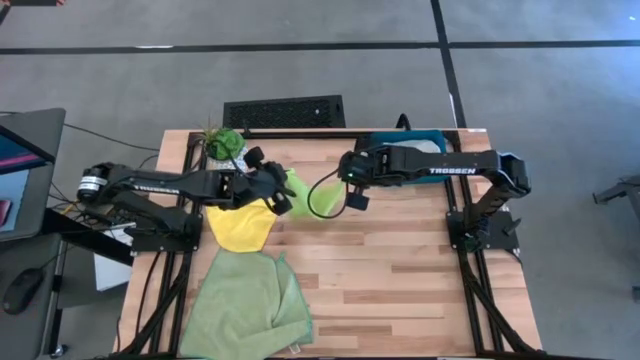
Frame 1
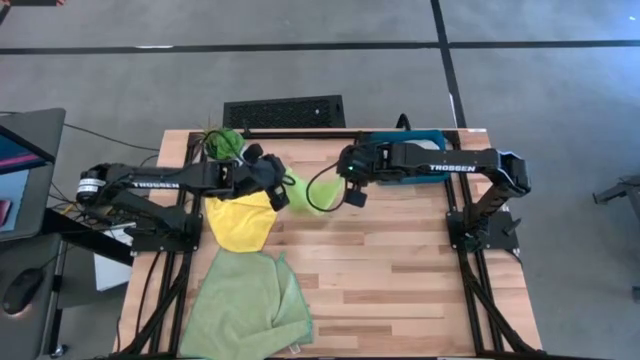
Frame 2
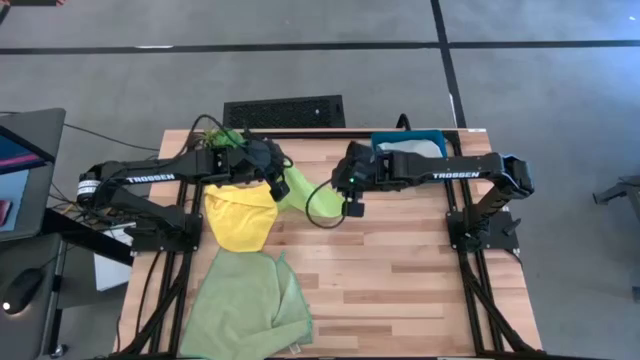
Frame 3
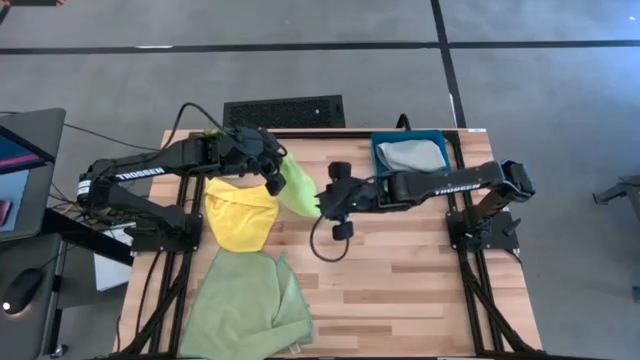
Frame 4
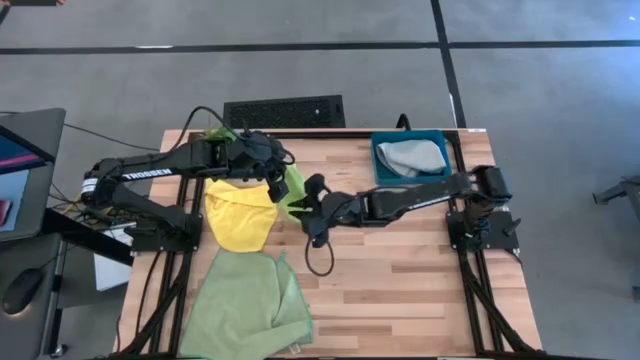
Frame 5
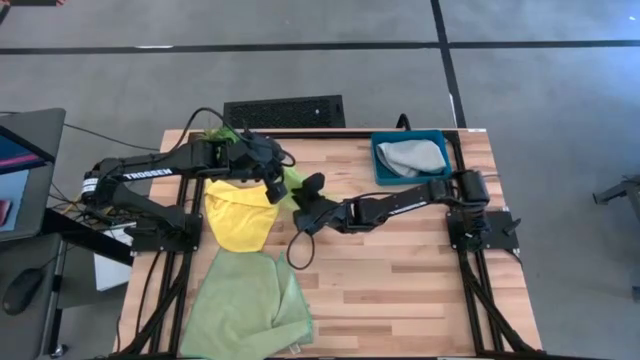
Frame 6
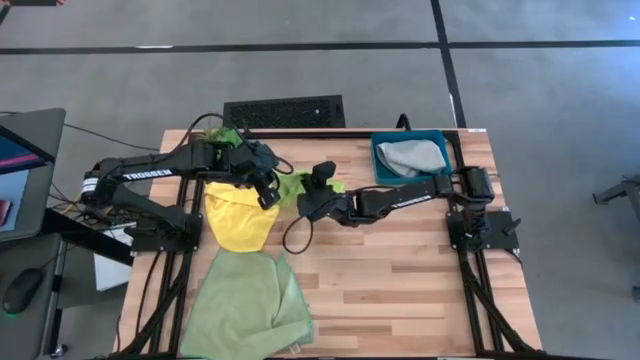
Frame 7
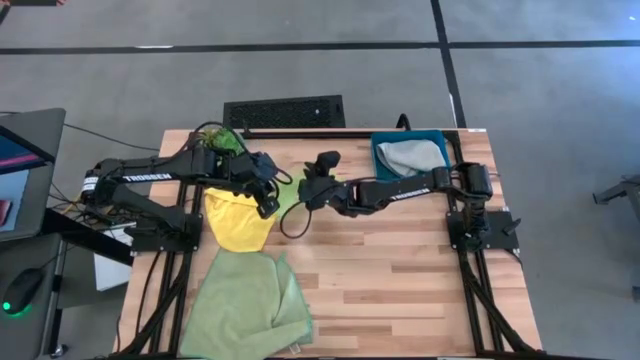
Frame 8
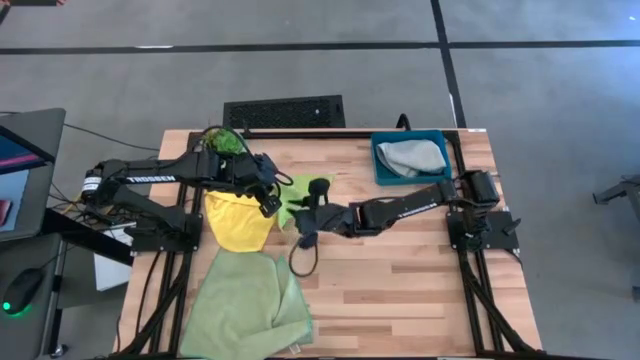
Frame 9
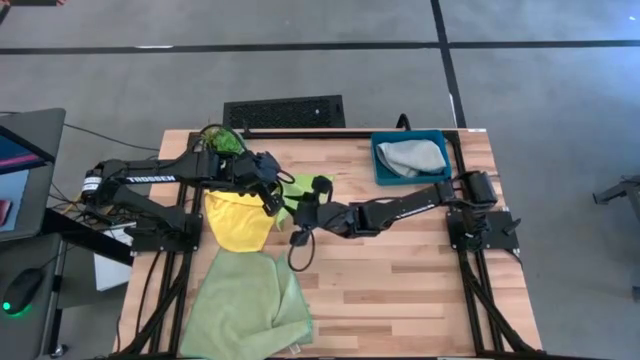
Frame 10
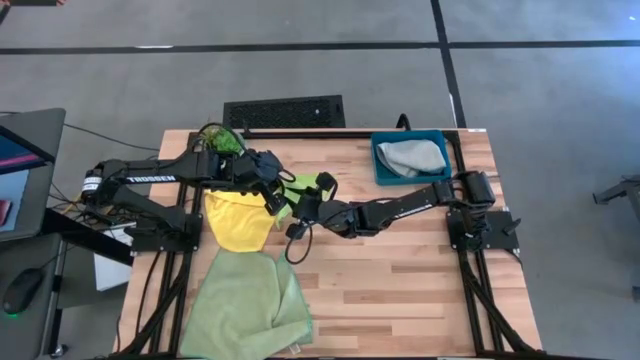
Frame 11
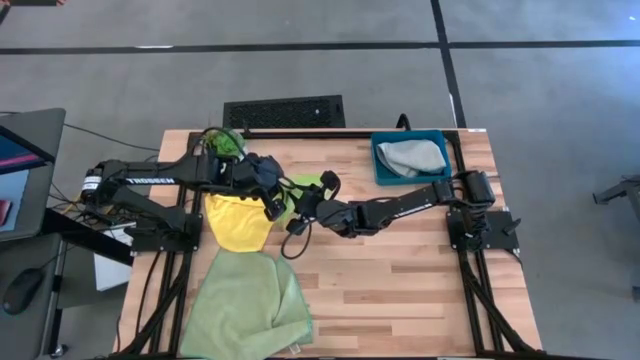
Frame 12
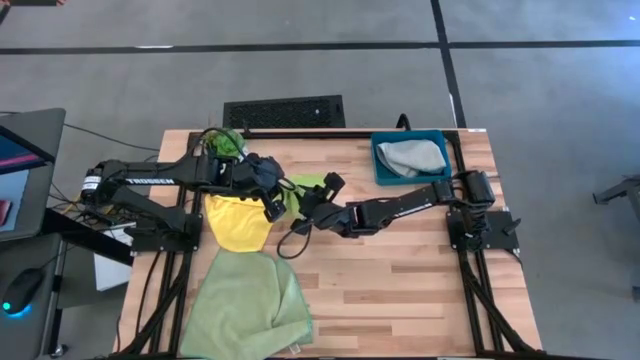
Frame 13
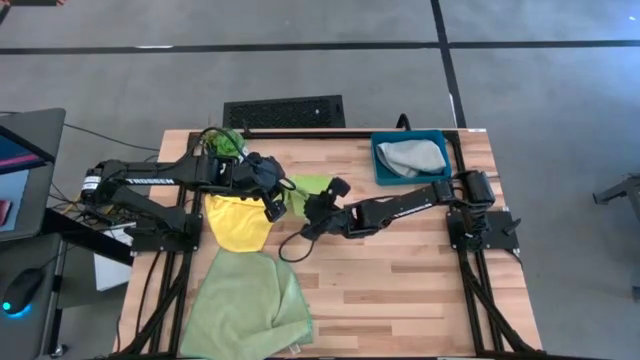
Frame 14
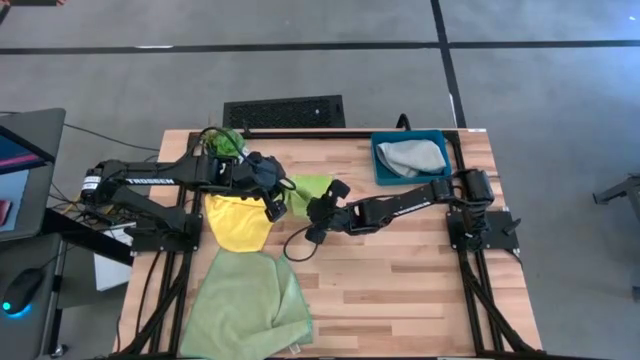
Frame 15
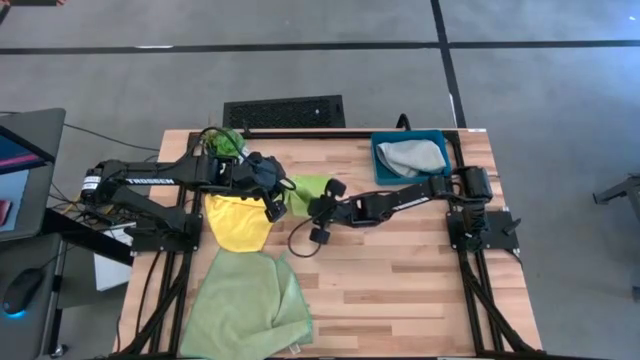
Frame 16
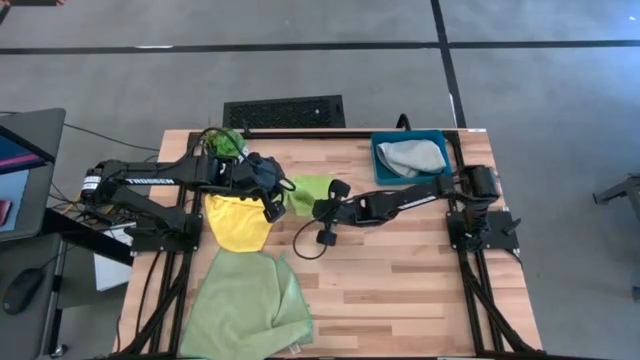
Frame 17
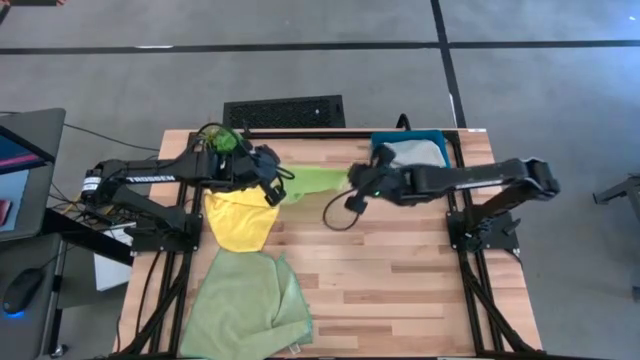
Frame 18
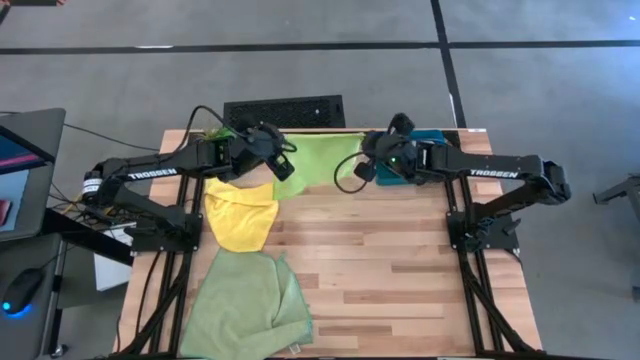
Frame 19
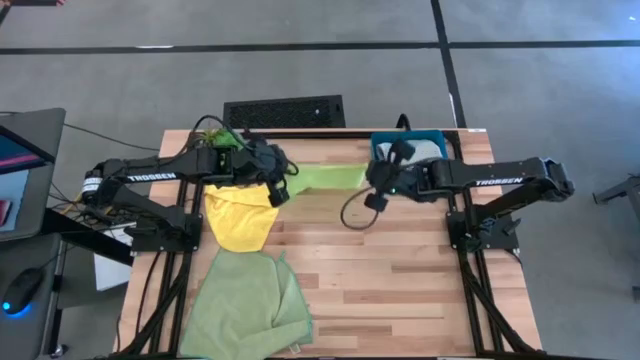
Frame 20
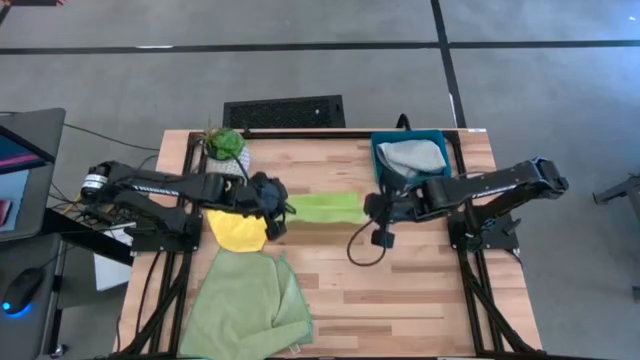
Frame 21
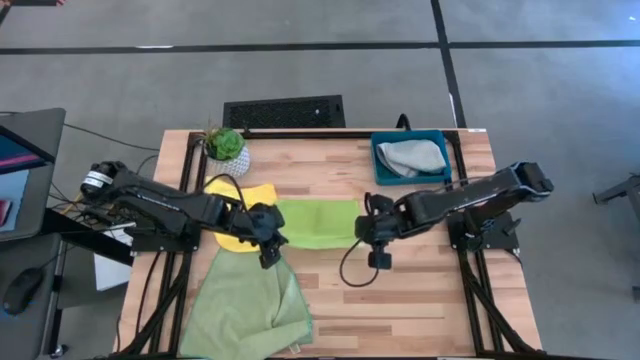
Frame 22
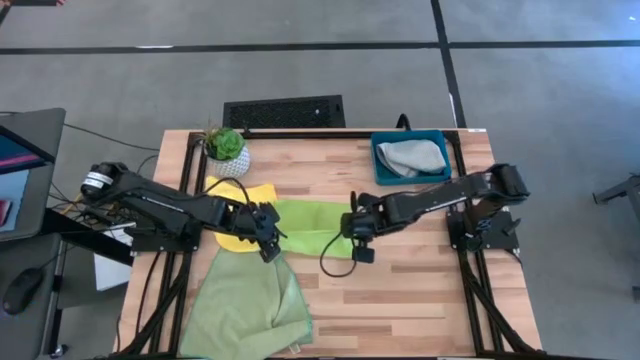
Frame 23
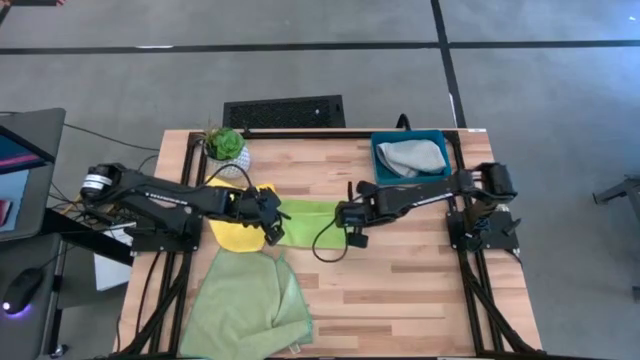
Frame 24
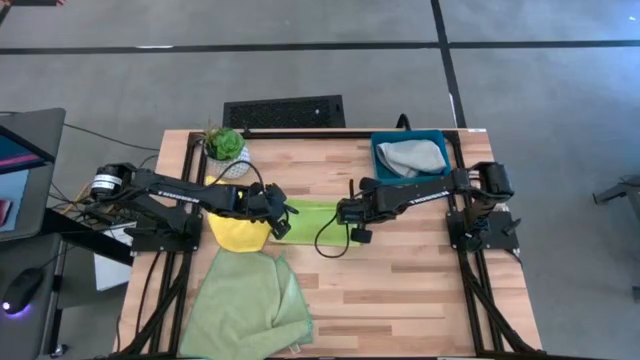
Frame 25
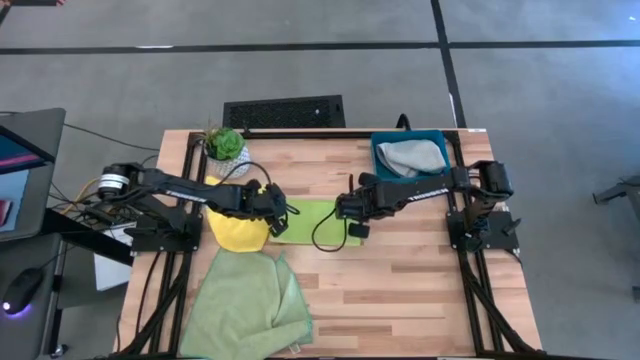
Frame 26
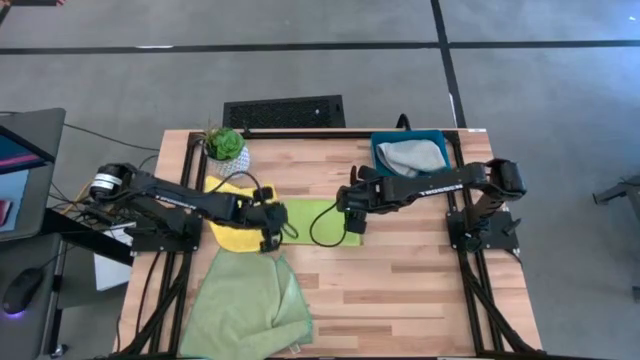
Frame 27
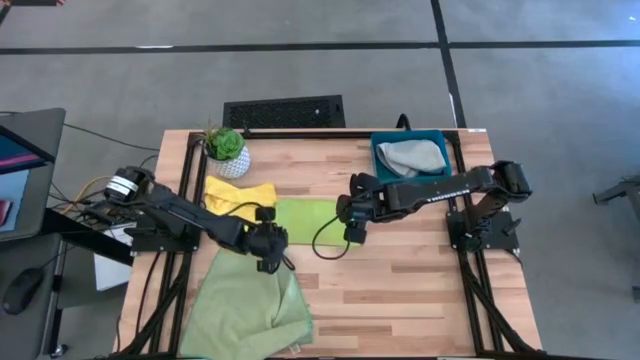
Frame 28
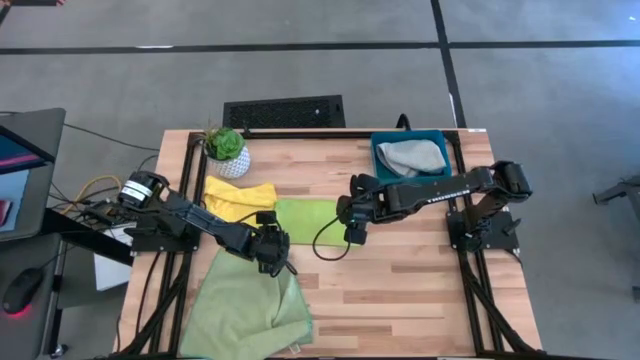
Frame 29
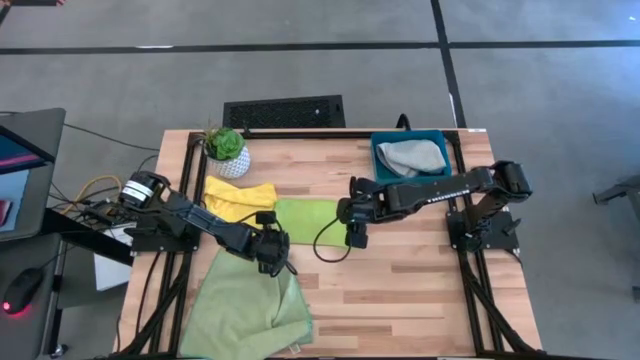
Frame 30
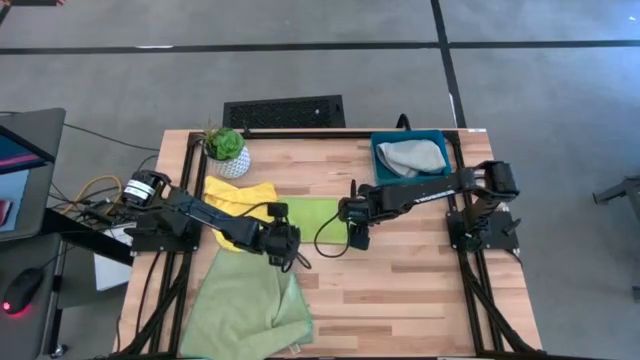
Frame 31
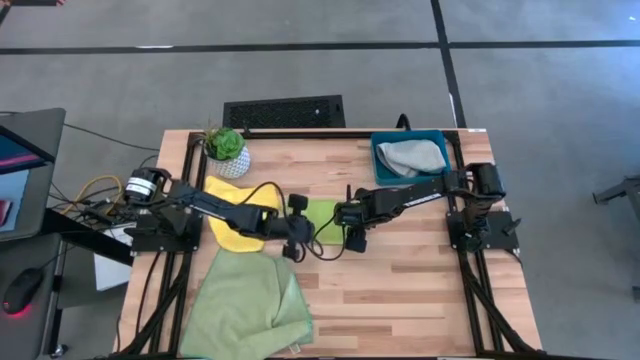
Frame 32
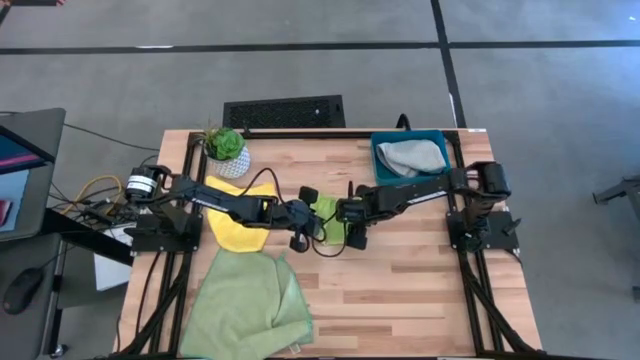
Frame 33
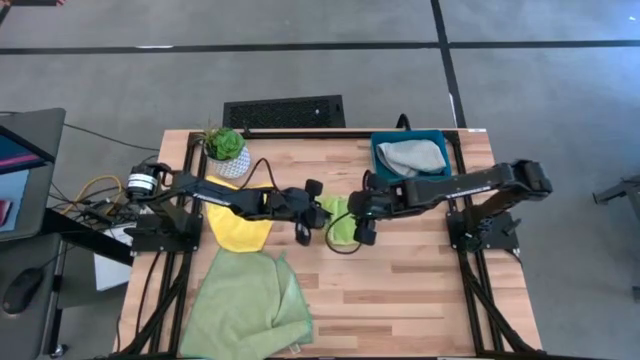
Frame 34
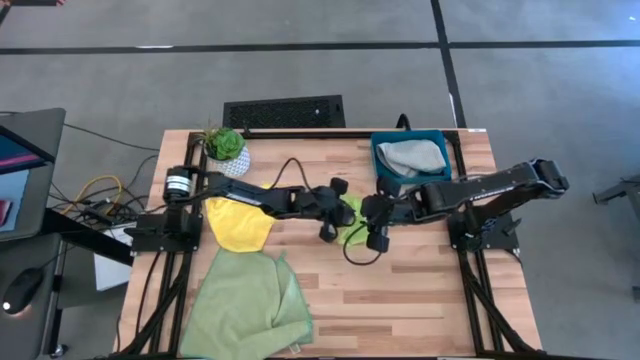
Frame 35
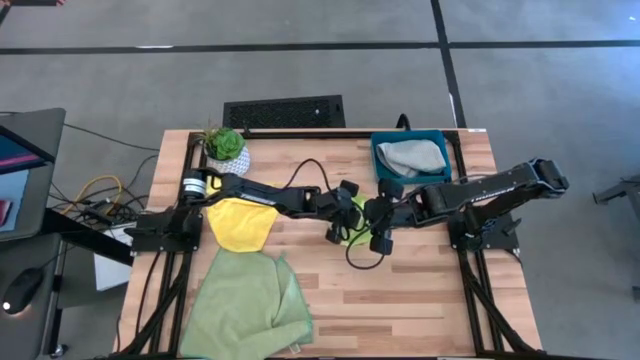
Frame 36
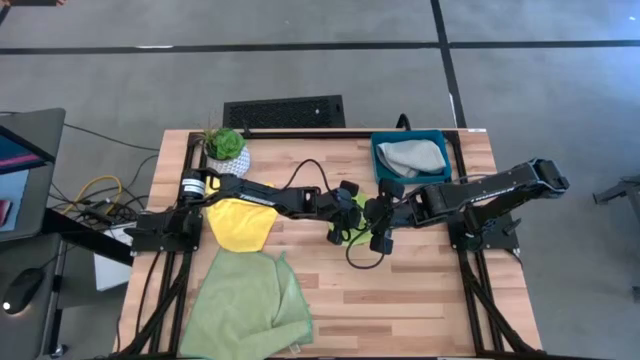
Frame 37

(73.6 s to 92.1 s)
Task: Fold microfiber towels
Fold the light green microfiber towel

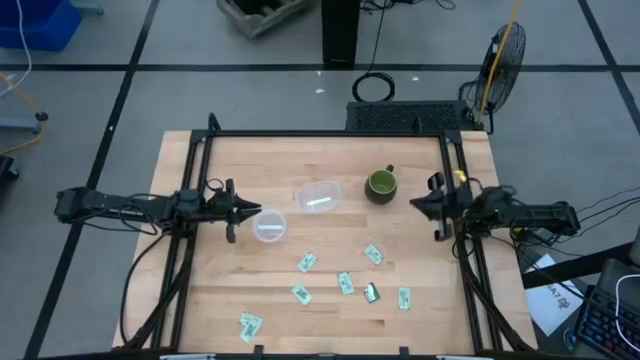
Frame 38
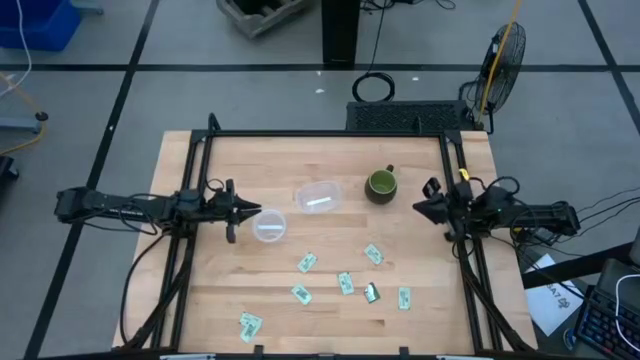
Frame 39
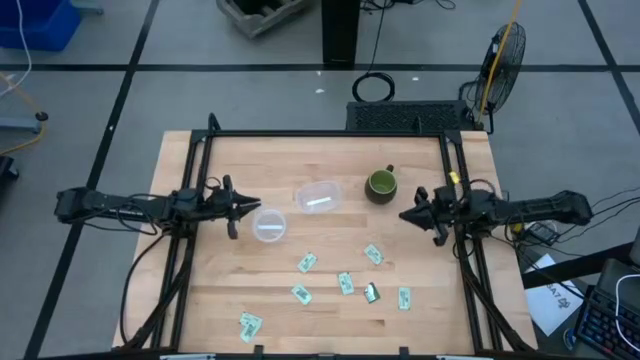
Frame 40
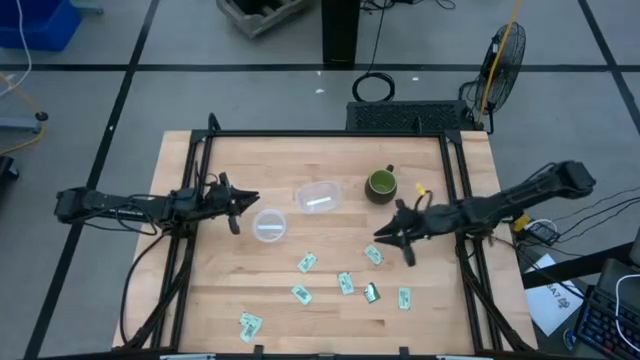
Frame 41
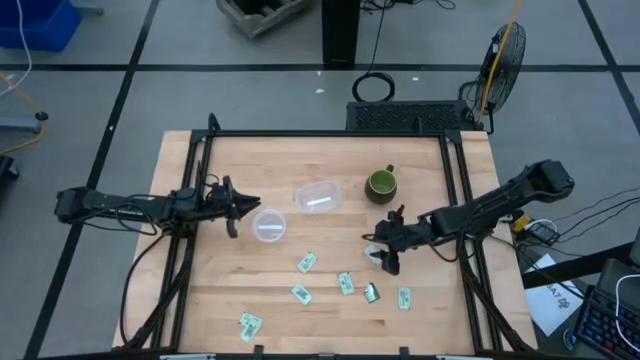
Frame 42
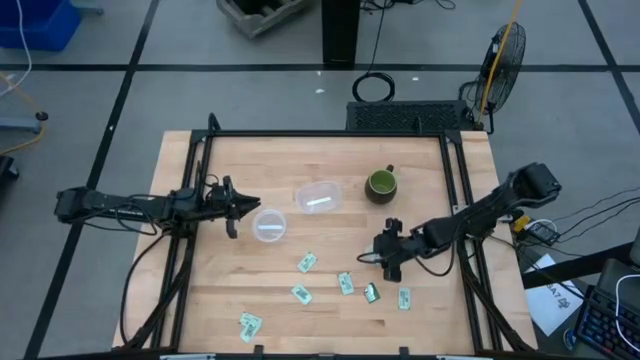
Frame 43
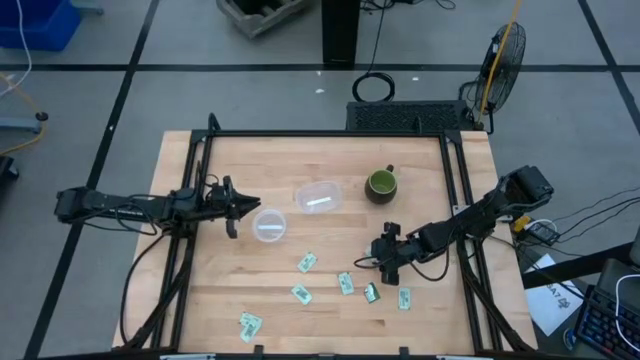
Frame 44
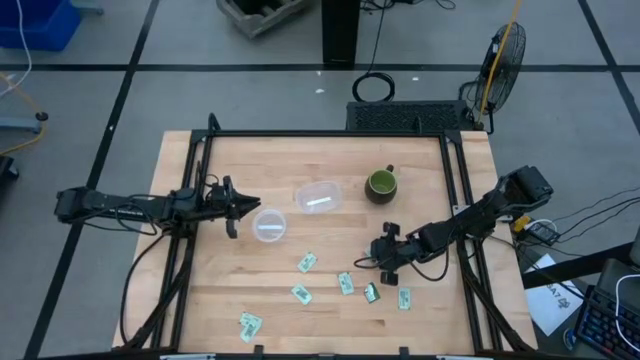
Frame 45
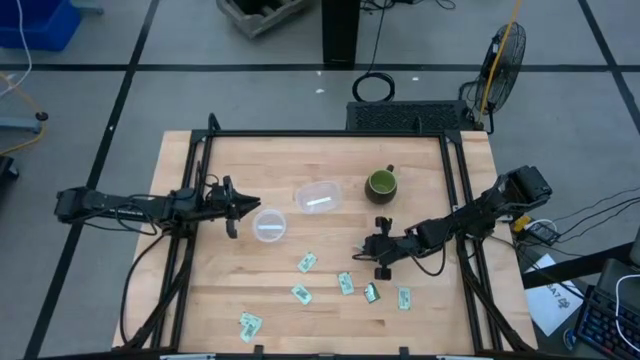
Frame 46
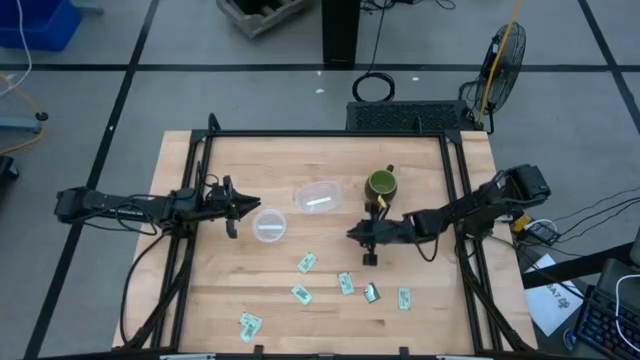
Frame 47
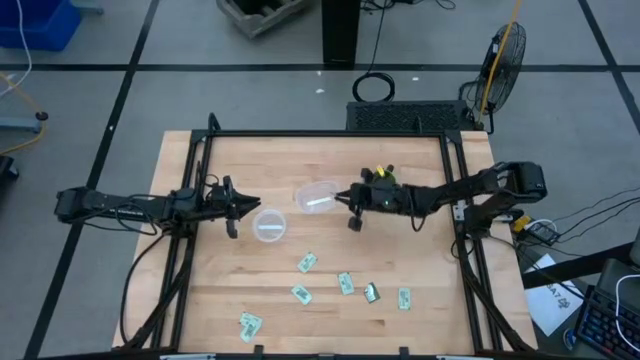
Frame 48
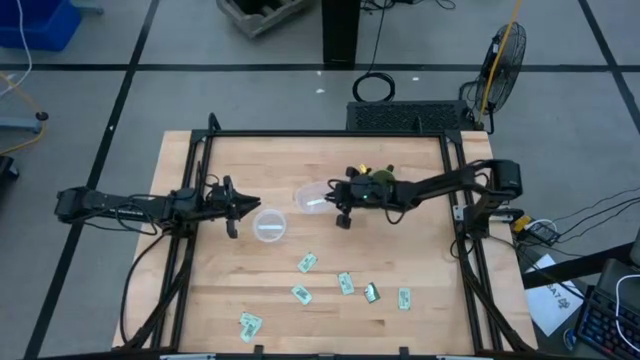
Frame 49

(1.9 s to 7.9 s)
Task: Pick and place Stevia / Truvia into bins
Put the stevia packet into the oval container
